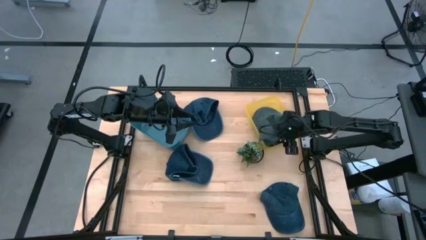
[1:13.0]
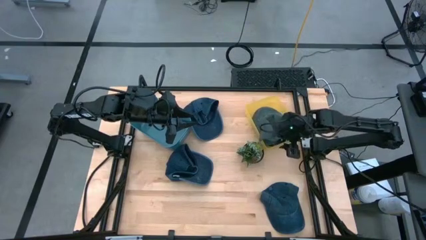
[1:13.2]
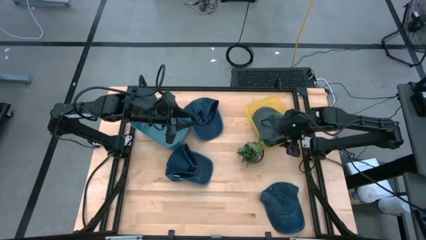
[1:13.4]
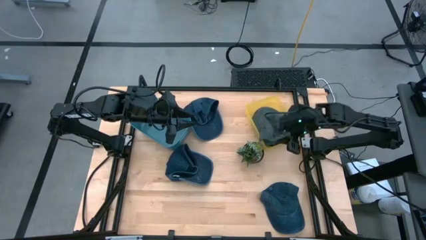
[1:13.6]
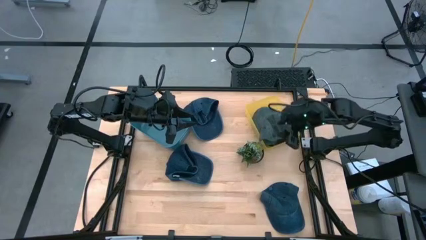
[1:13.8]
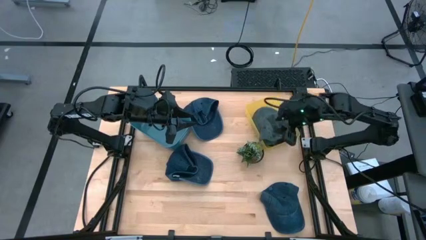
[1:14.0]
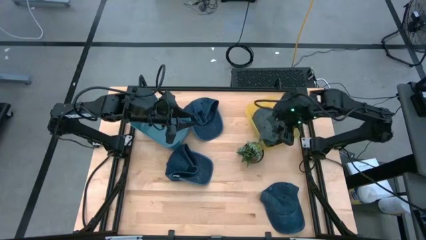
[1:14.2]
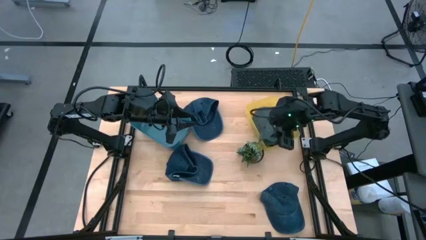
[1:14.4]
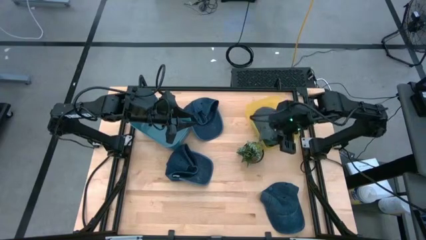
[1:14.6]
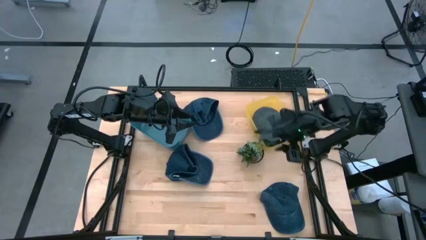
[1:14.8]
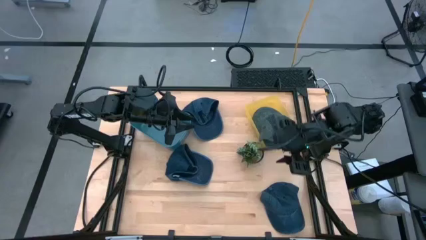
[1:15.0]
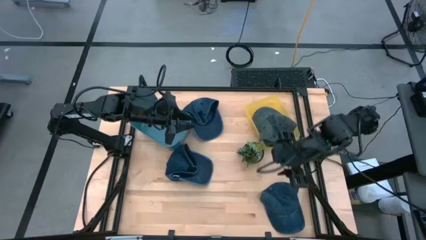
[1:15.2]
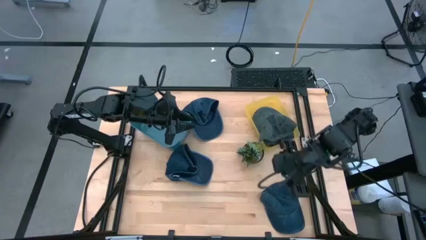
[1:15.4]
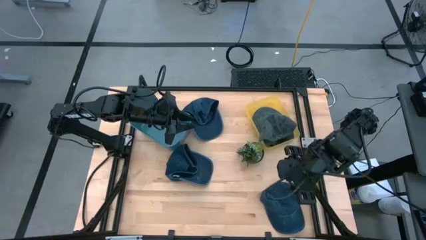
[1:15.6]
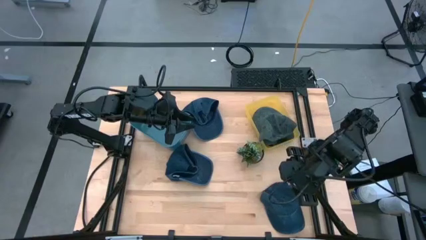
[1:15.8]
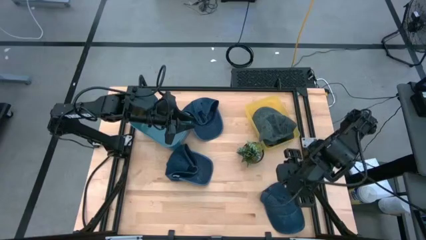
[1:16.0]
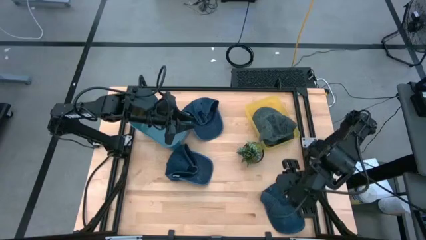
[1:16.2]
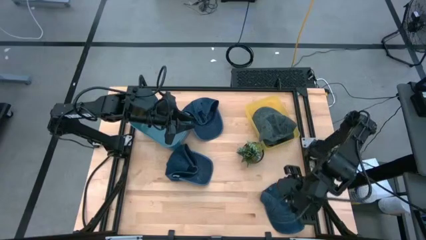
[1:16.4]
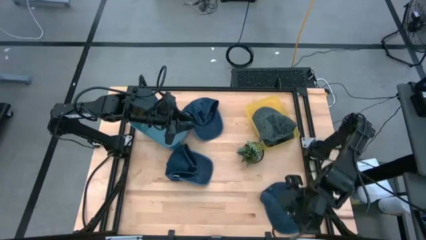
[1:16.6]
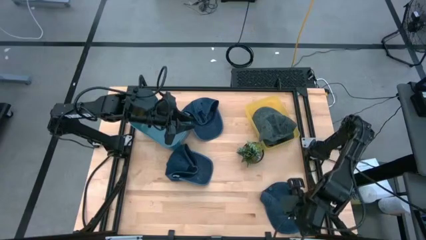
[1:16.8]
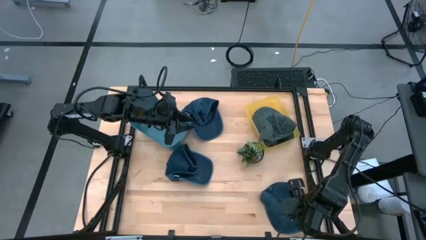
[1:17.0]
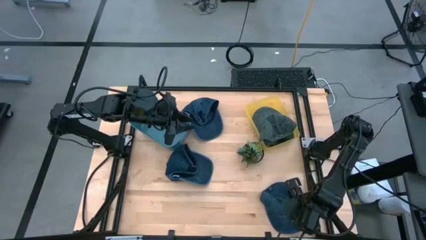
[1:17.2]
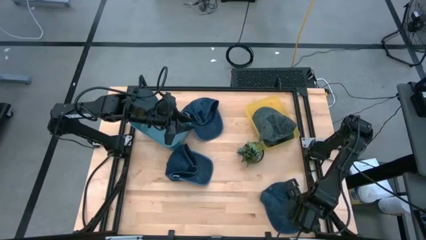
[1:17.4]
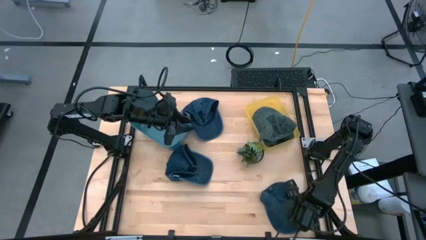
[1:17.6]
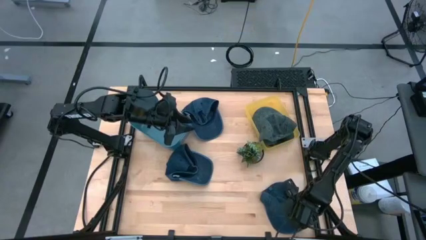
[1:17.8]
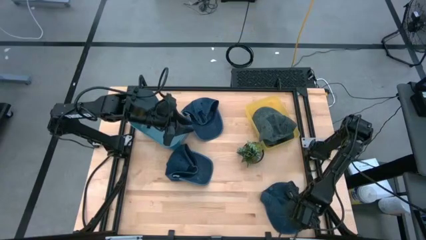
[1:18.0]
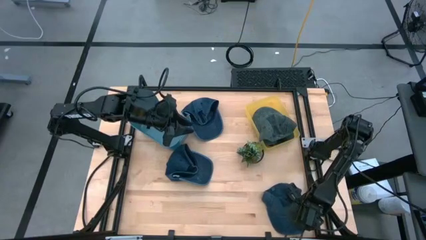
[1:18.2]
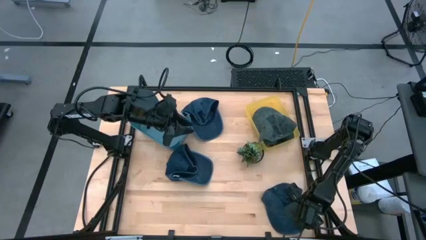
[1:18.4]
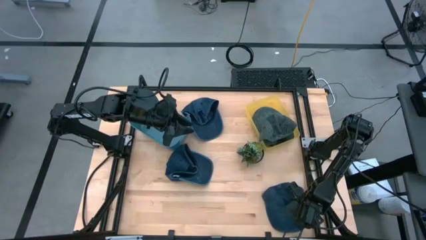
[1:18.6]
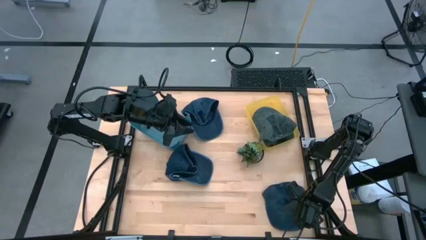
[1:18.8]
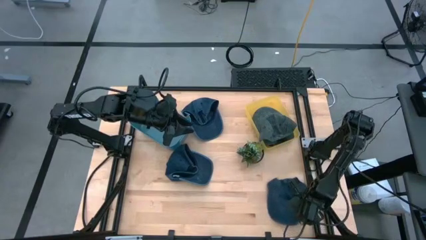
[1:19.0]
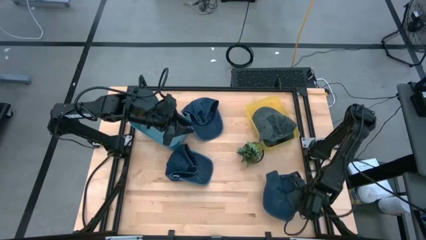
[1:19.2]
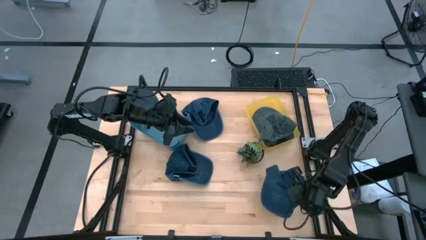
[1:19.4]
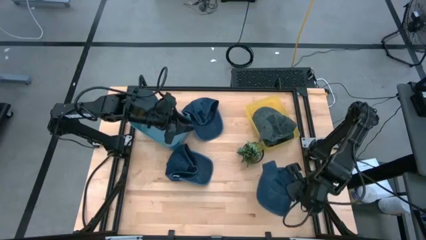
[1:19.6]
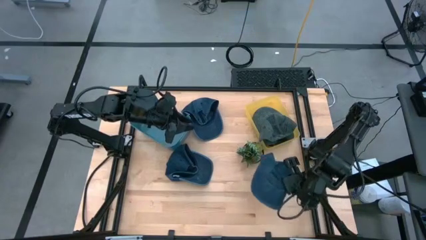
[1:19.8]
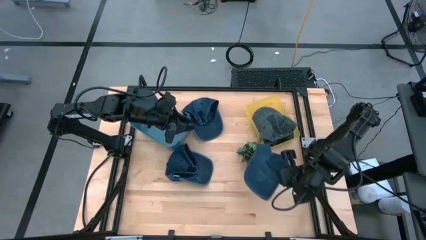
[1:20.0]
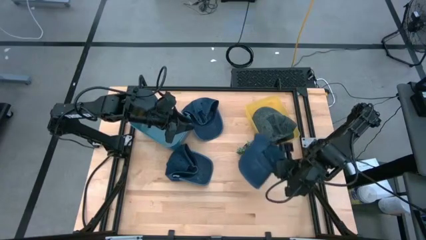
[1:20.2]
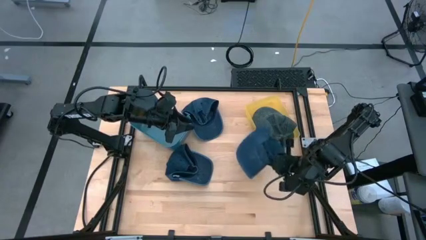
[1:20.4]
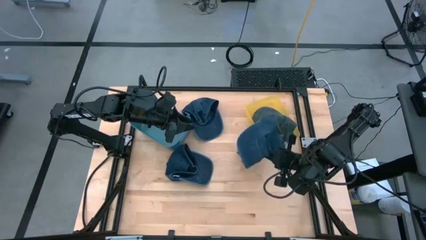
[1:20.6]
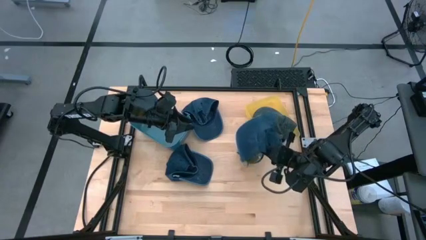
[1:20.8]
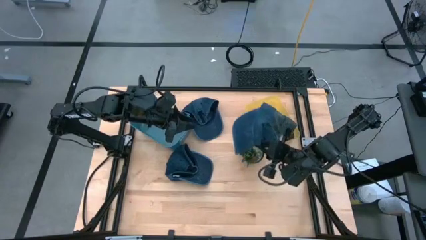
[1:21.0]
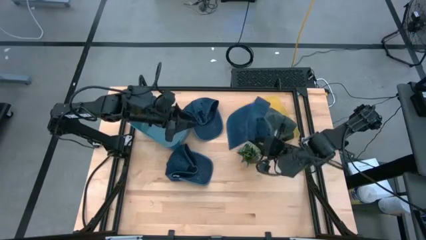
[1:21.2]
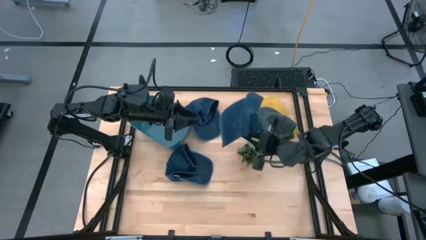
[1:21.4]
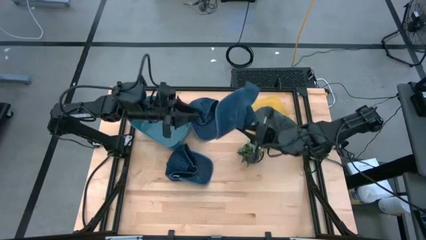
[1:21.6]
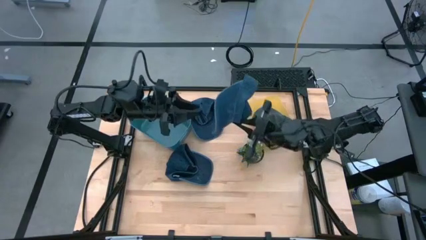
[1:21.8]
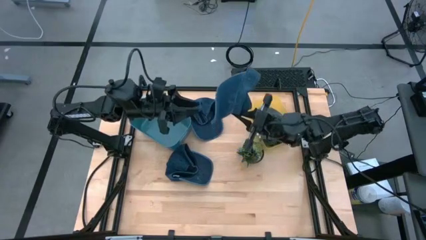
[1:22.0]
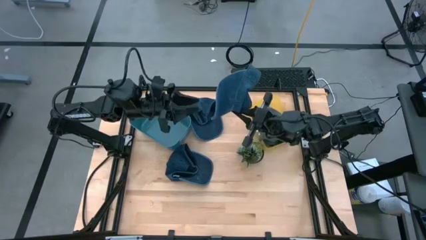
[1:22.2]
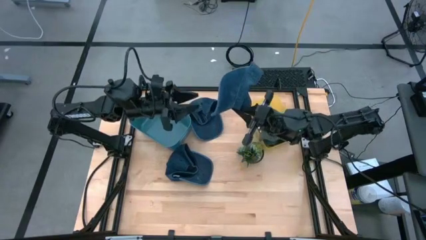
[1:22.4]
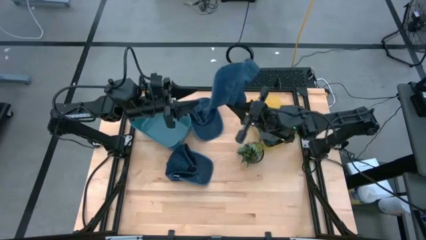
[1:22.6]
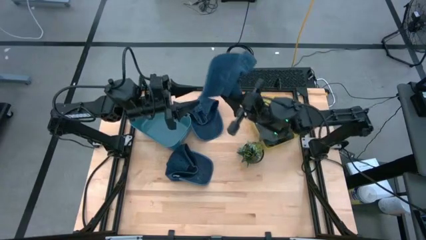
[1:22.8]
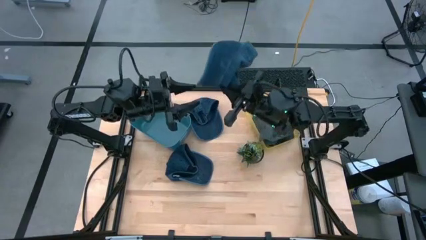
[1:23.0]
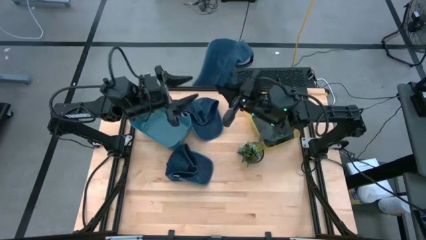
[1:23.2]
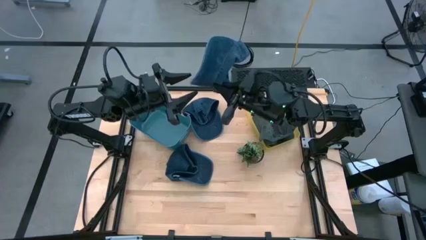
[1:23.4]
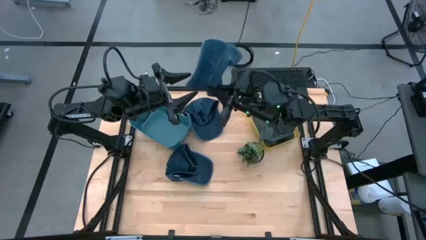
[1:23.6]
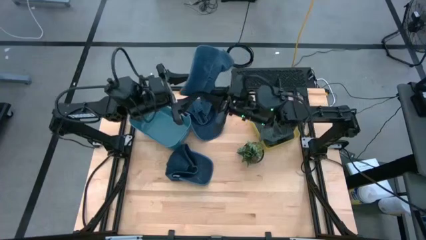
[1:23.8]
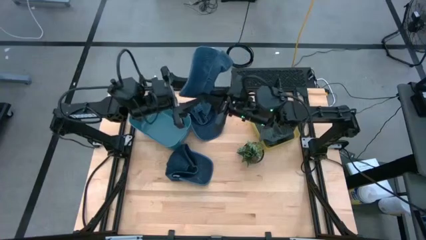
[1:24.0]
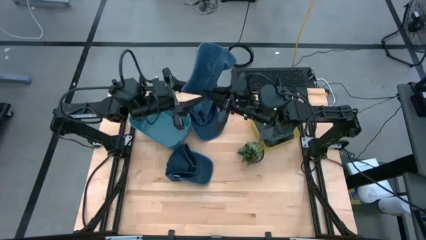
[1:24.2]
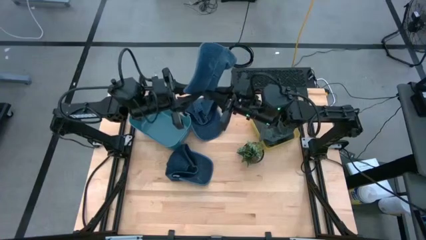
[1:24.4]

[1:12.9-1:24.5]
Task: Pick & Place hat
Put the bottom blue cap into the blue bin
